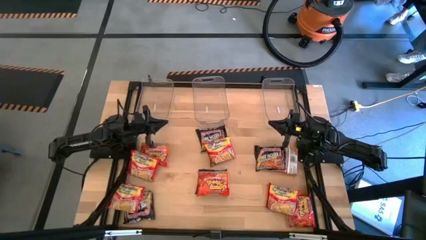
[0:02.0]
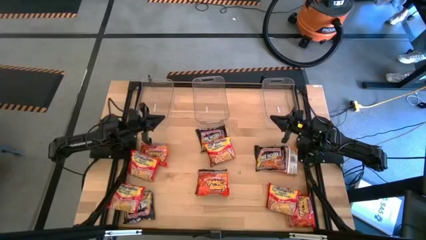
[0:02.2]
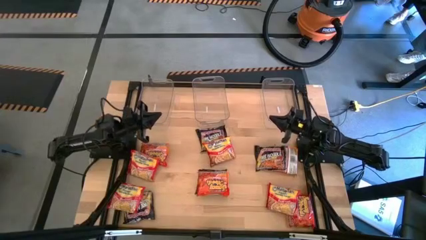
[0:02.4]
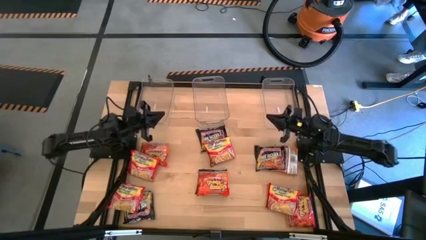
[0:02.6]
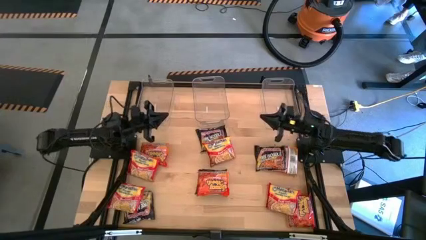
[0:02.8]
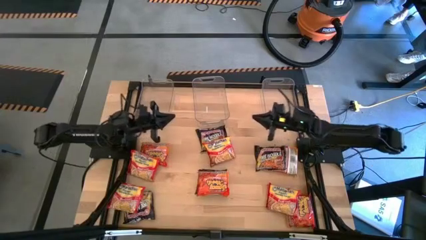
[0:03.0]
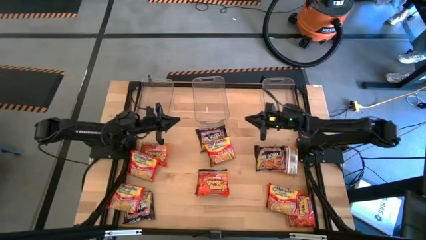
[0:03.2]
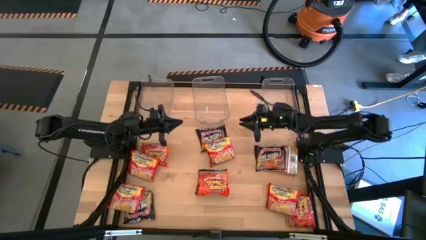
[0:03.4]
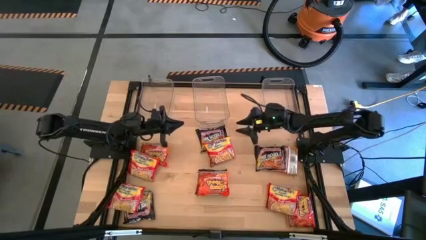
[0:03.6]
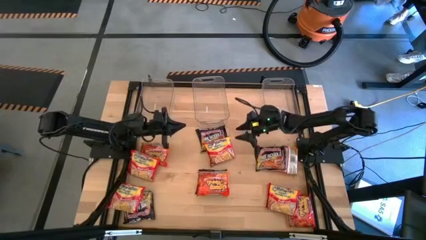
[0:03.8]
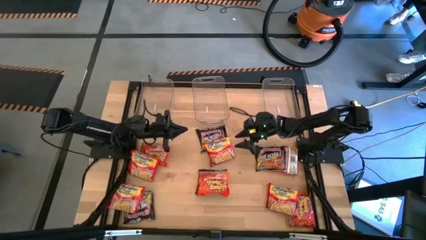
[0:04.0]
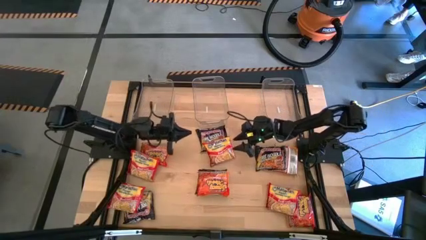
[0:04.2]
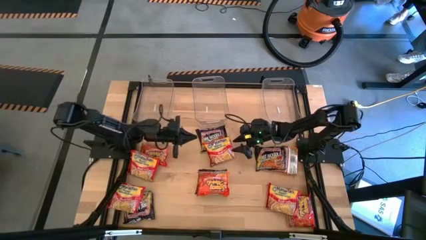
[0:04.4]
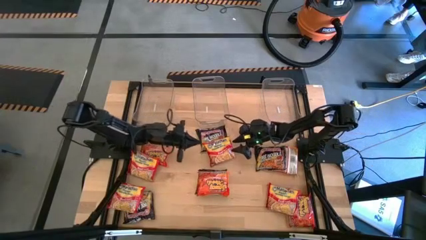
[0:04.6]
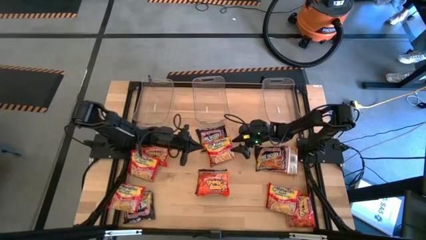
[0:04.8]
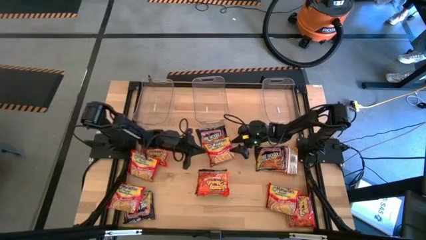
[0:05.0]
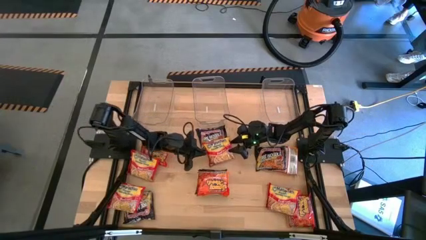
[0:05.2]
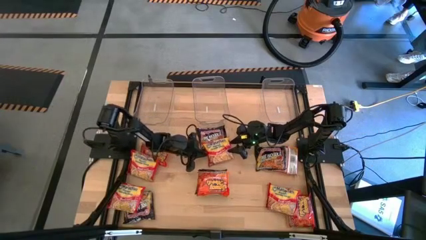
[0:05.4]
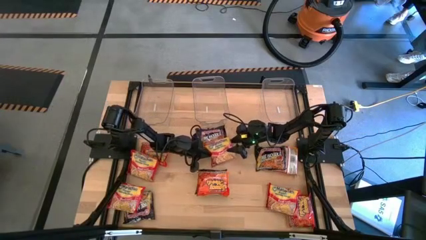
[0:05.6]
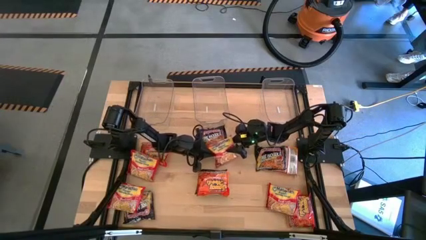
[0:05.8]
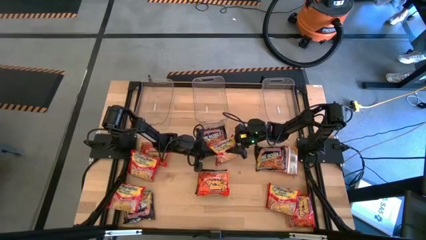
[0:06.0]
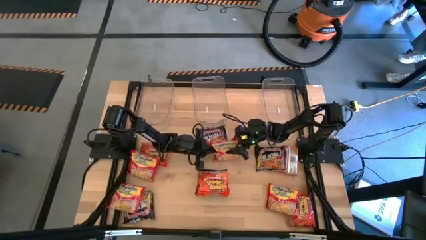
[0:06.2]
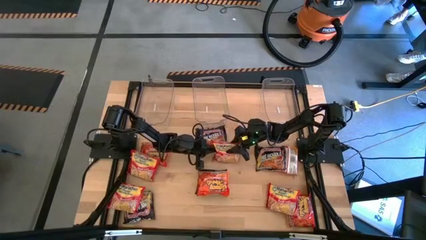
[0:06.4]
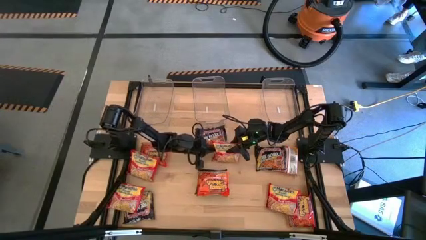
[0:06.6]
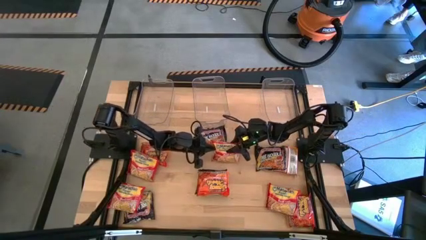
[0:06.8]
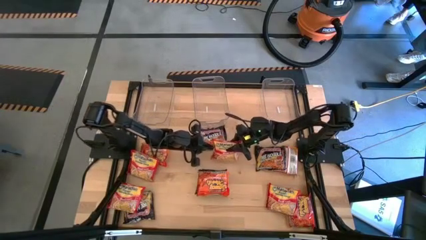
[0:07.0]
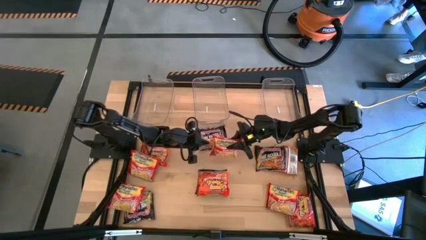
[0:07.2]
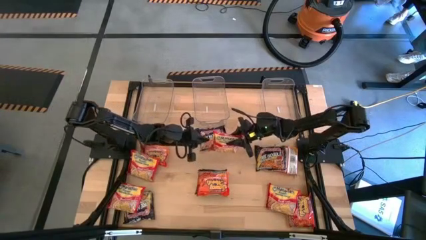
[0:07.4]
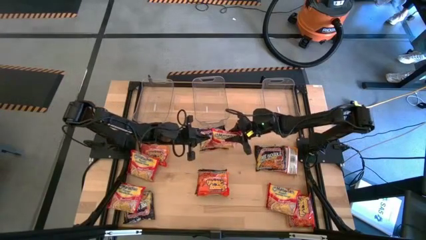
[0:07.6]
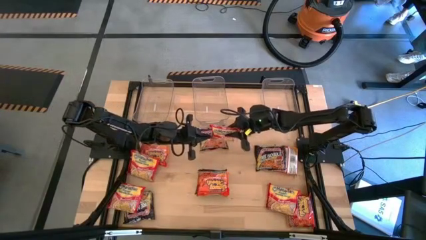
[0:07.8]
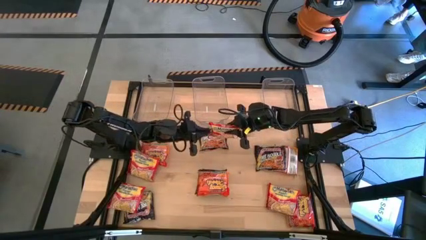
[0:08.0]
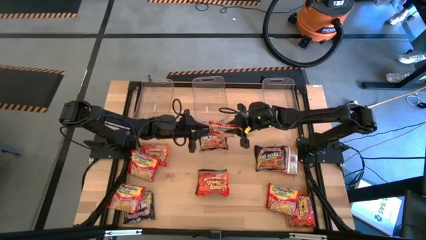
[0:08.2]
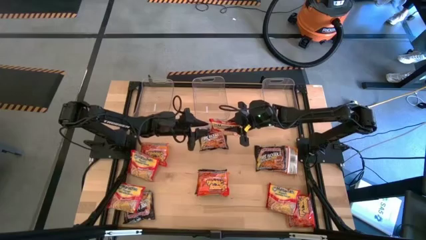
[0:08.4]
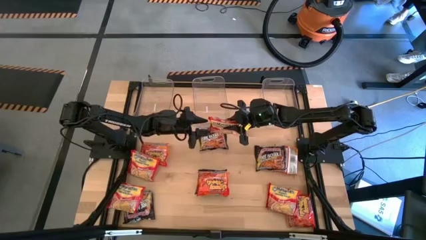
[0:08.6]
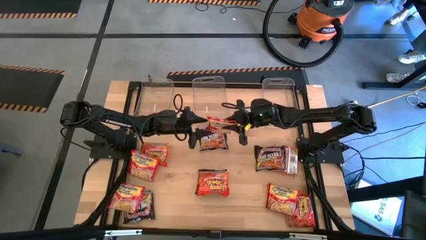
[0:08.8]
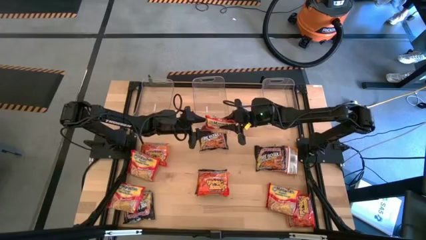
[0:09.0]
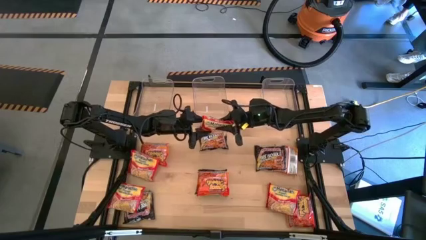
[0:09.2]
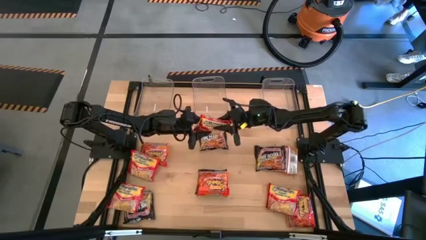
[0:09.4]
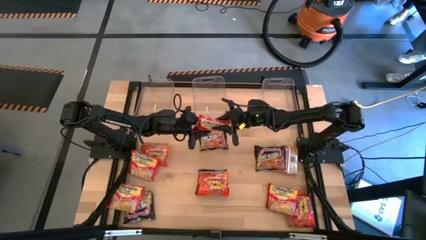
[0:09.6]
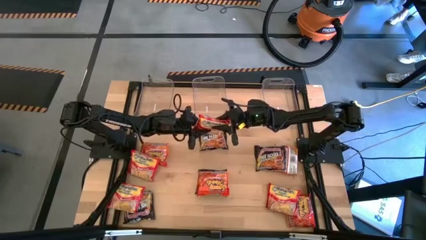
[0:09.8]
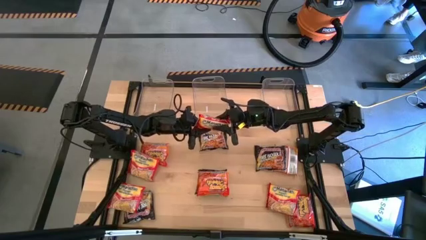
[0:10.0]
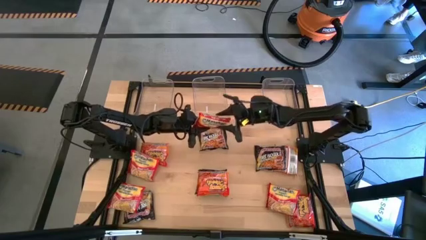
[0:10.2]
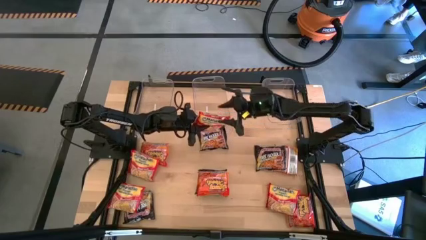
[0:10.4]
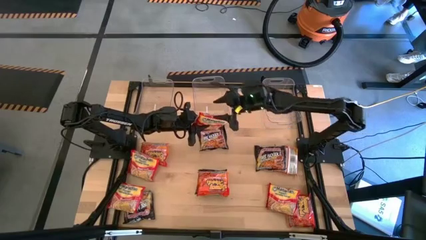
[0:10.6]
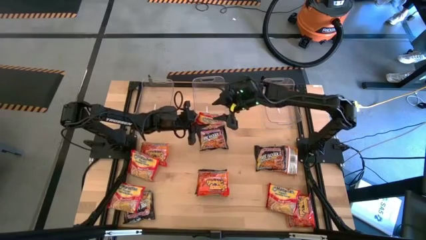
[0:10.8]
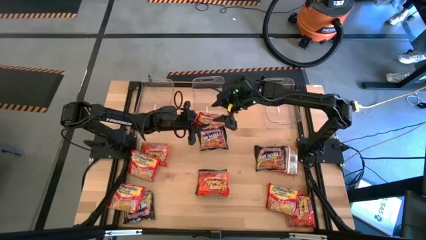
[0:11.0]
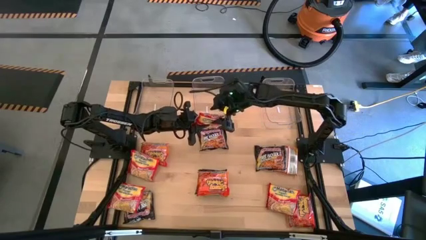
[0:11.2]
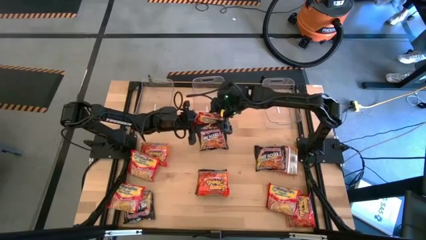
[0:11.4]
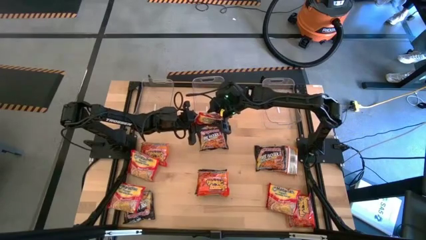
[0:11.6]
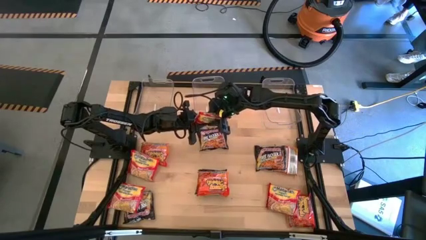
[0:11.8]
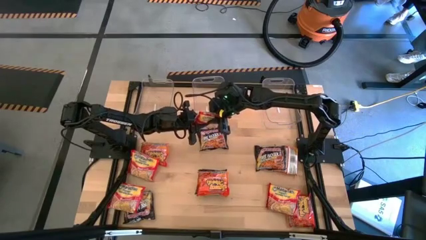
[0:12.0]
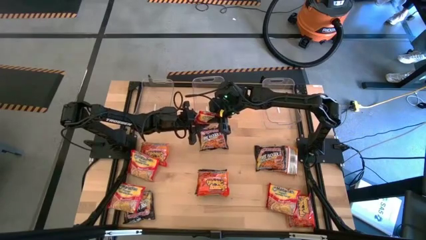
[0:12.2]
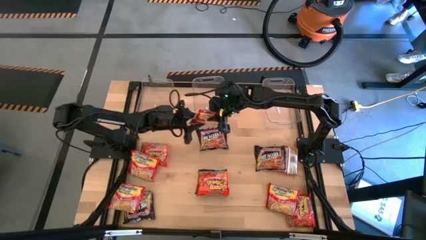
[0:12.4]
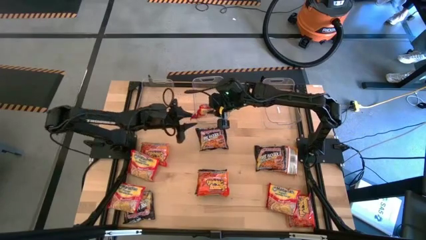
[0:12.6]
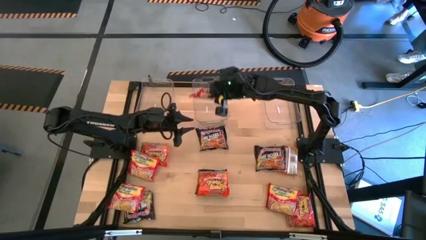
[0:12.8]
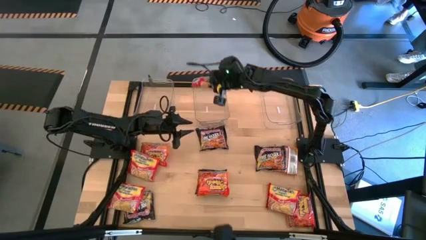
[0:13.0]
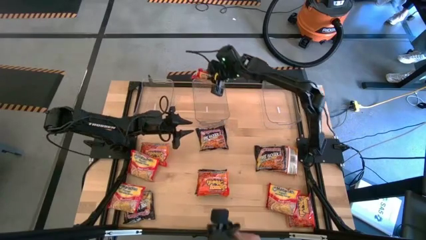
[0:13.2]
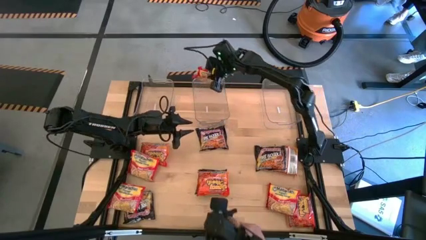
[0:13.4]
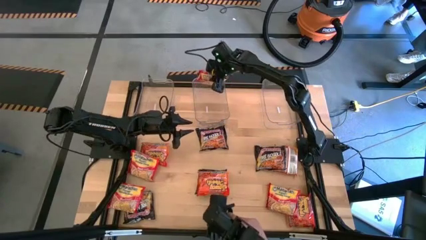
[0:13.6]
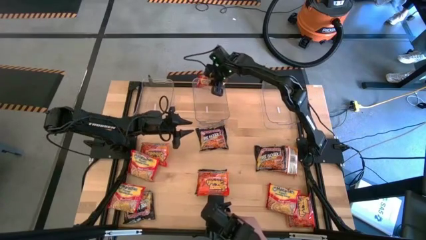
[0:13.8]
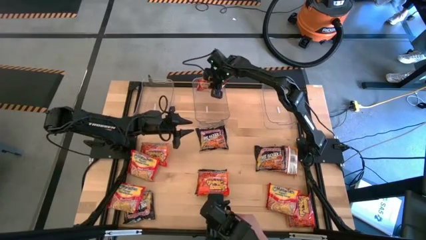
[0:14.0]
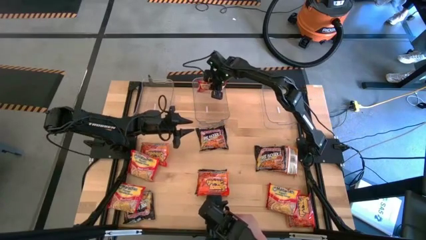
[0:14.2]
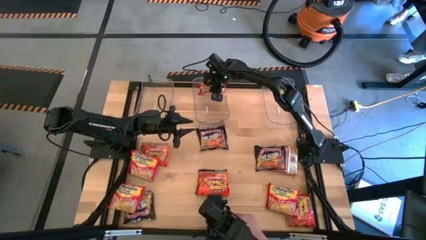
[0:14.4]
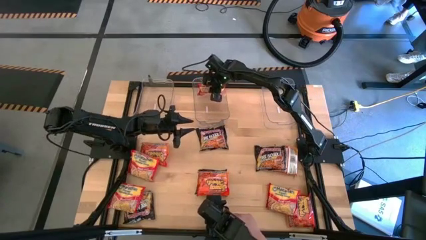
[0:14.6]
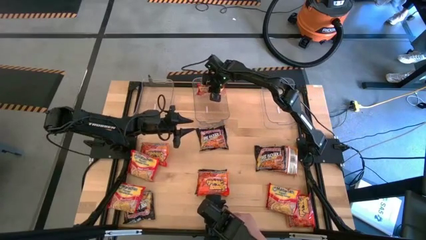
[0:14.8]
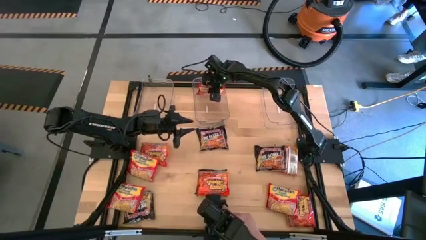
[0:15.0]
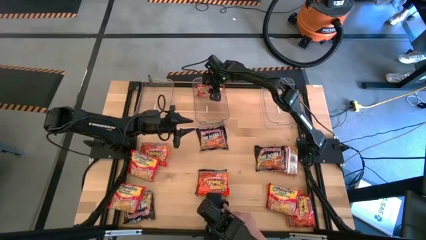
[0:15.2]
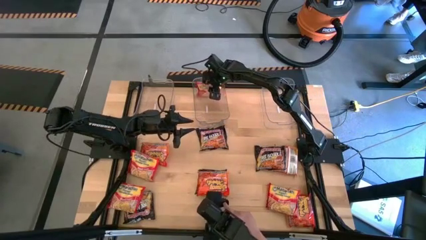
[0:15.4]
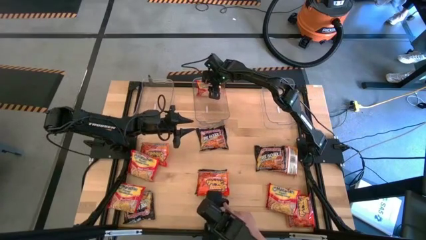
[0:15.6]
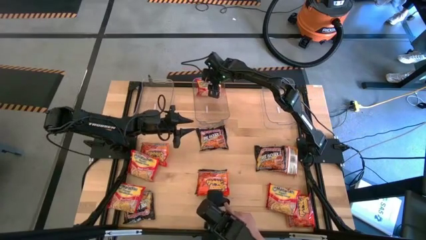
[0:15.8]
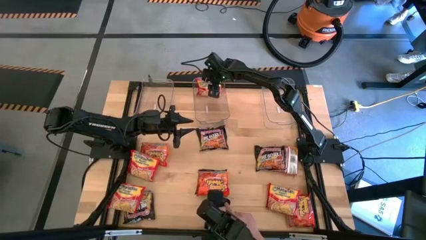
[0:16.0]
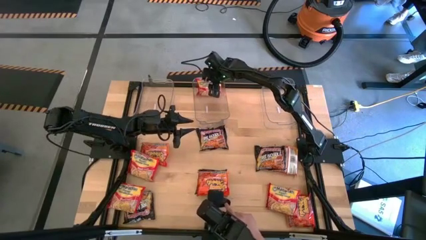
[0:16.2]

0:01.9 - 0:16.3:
Task: Sort Maruchan noodles
Put the top right red noodle pack into the middle transparent bin
